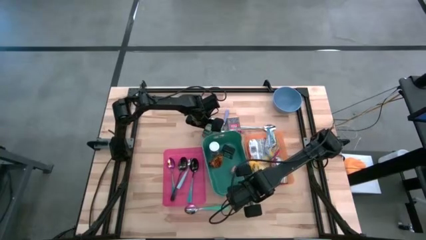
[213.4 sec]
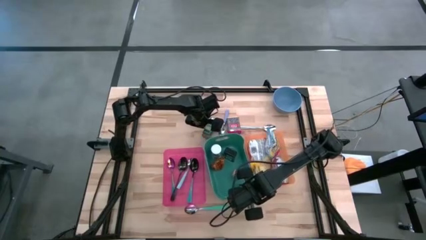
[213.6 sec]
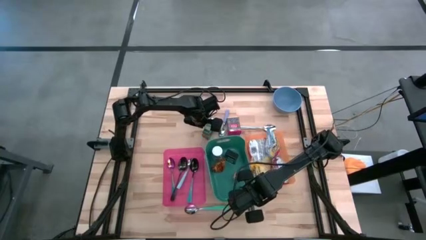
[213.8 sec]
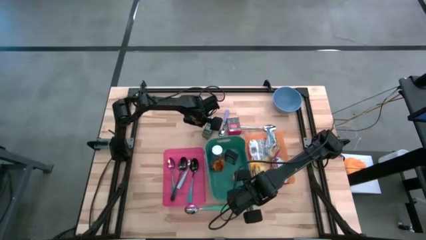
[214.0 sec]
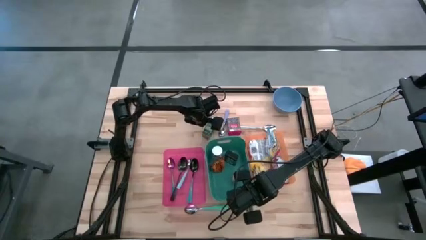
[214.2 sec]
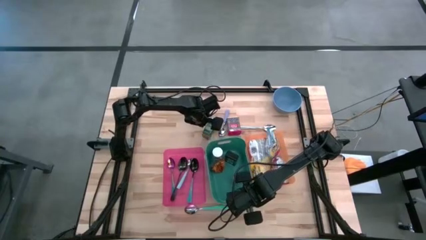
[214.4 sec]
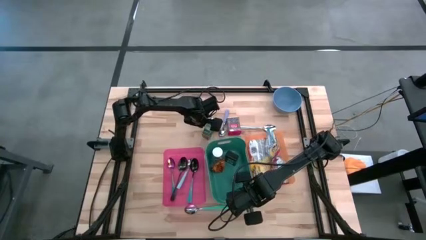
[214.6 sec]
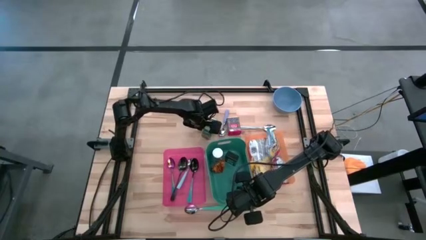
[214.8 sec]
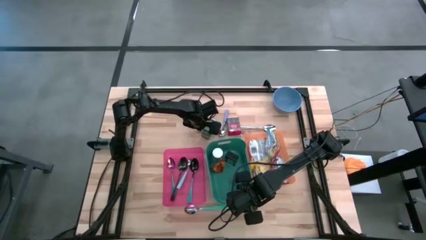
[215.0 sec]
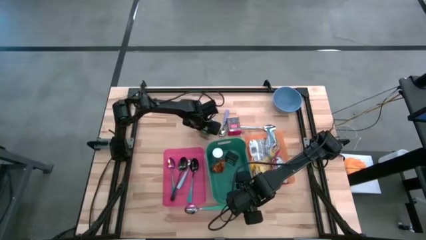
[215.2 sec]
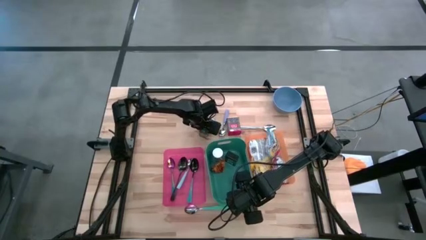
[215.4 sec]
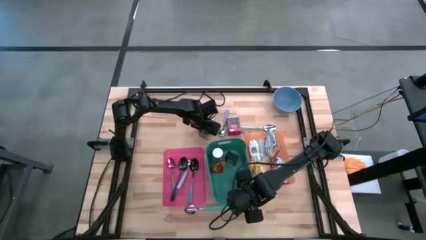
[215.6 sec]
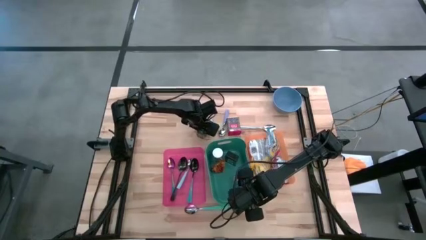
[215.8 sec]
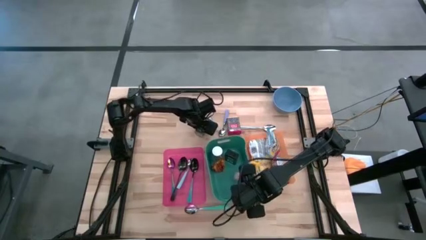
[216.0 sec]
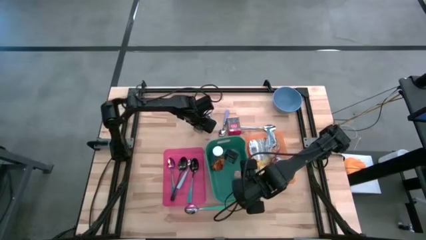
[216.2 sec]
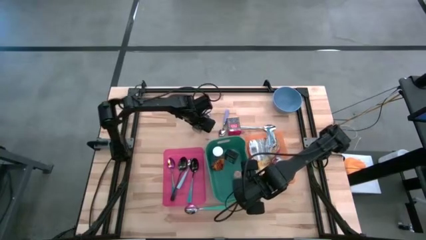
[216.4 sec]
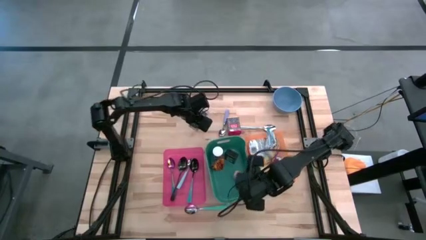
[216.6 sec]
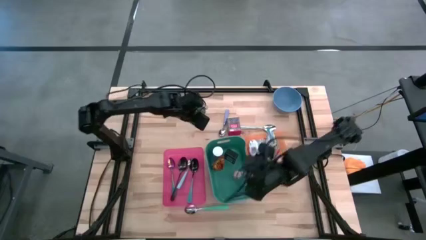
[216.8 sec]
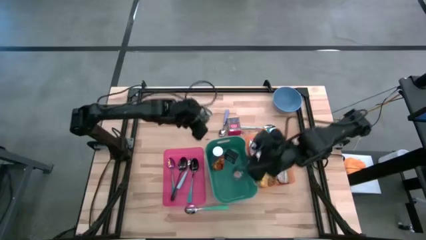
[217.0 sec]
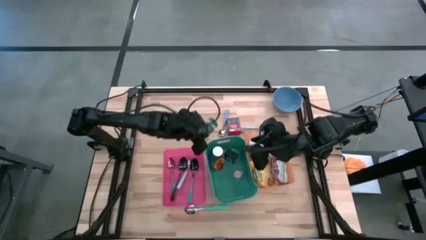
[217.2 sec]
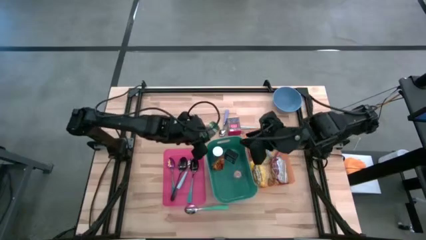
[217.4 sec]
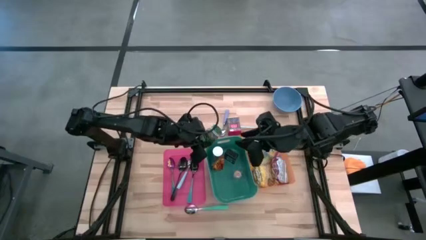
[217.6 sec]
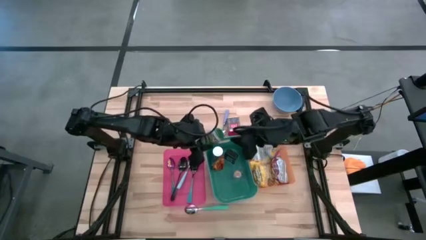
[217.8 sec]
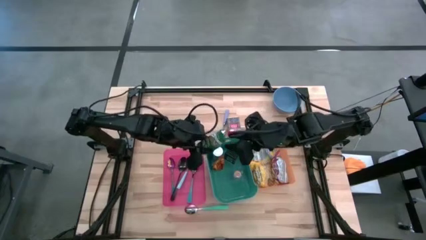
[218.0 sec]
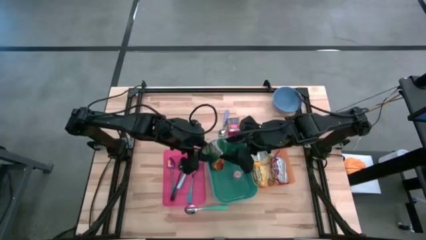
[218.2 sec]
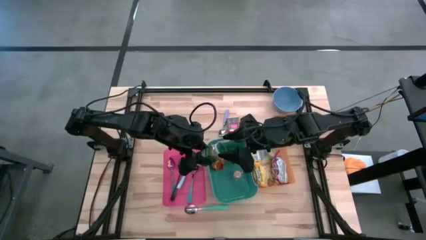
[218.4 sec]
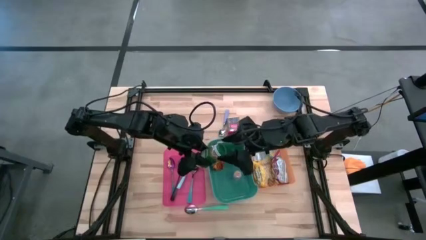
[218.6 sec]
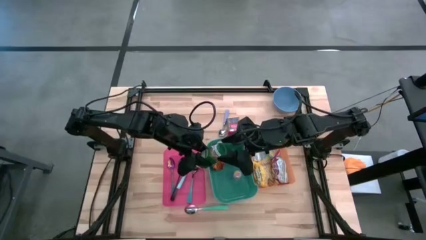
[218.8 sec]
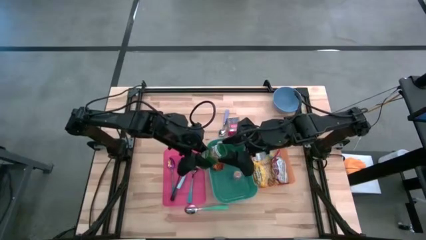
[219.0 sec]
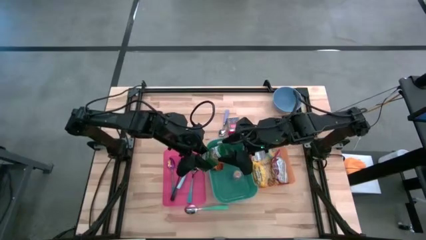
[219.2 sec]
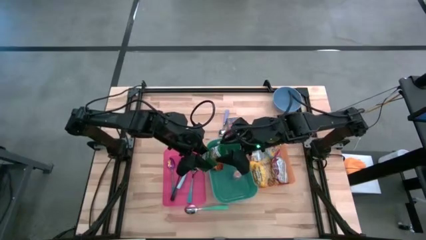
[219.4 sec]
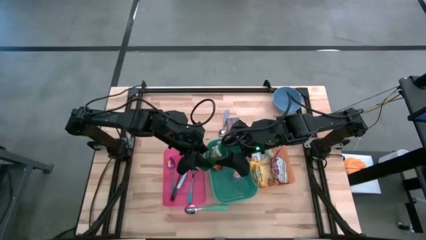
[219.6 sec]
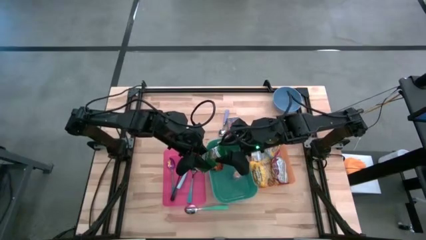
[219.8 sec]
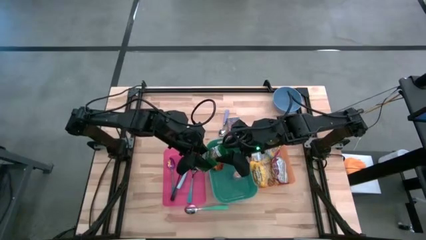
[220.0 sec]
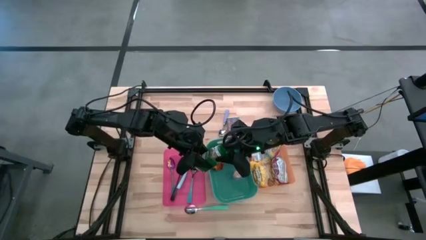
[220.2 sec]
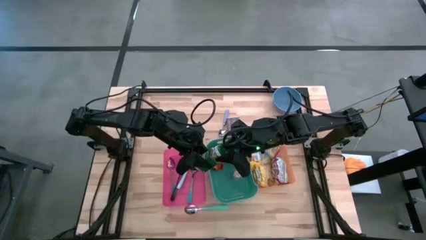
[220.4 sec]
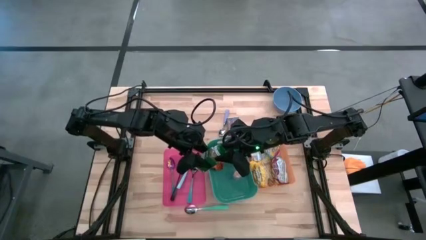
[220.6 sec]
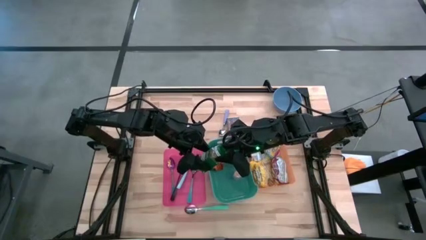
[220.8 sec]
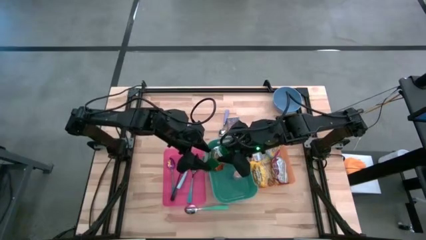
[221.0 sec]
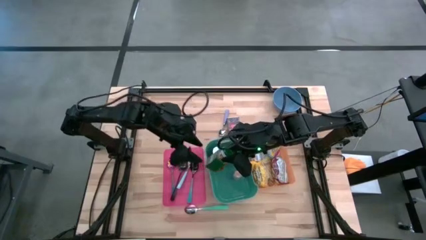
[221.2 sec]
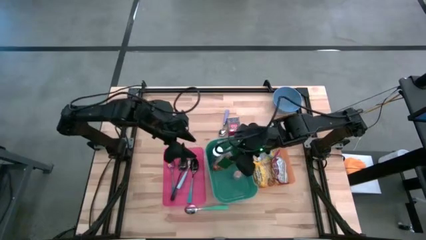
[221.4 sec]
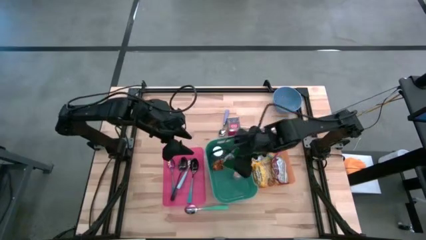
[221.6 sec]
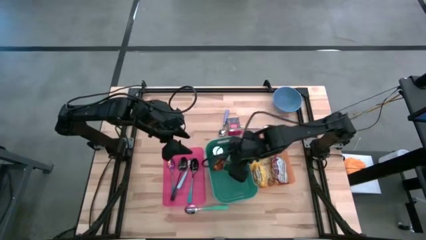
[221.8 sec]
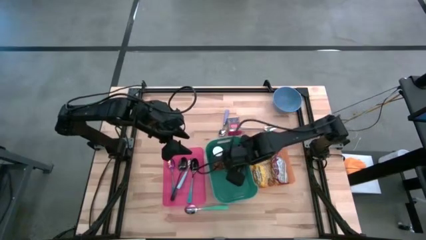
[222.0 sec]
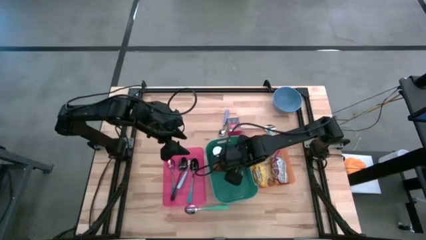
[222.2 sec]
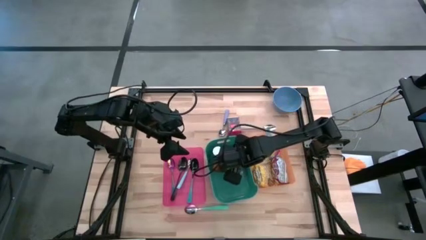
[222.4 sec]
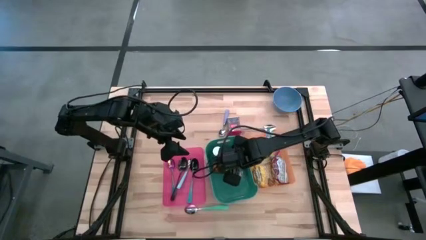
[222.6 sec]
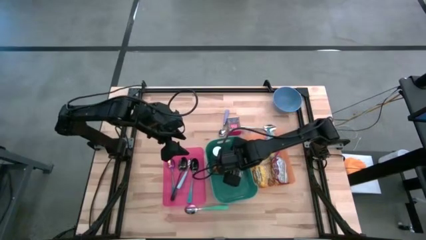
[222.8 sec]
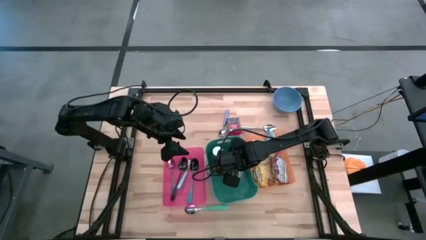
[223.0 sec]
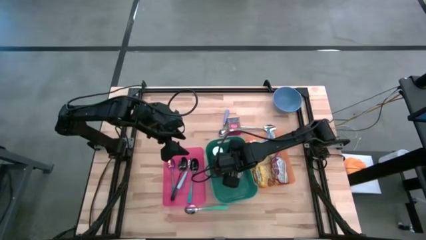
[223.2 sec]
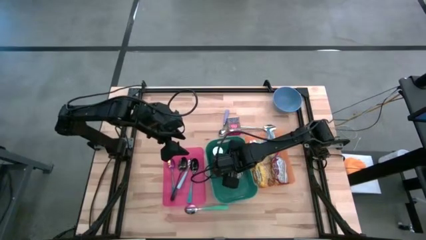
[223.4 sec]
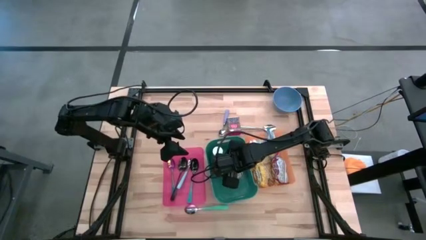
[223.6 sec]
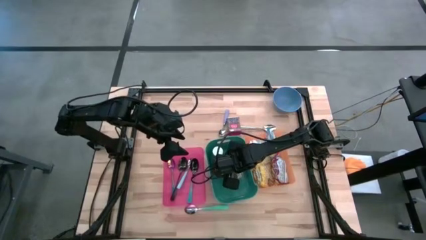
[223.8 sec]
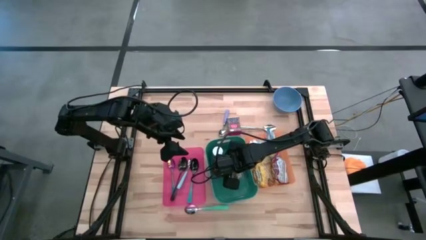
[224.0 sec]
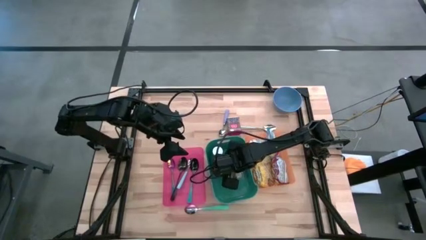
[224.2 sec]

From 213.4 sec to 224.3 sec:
Put the green seasoning bottle into the green bin
